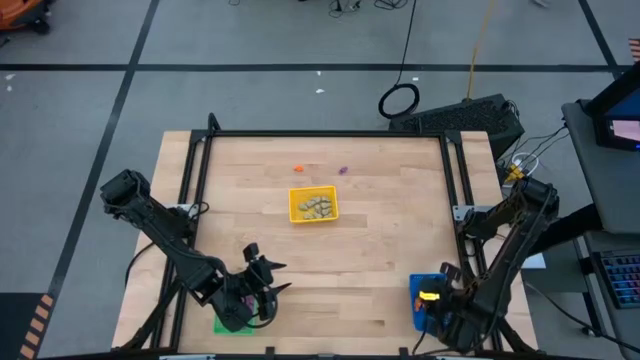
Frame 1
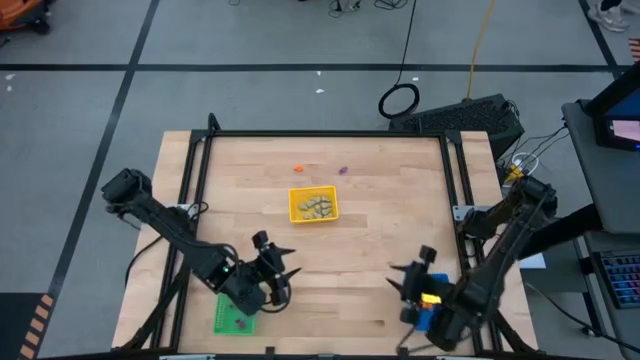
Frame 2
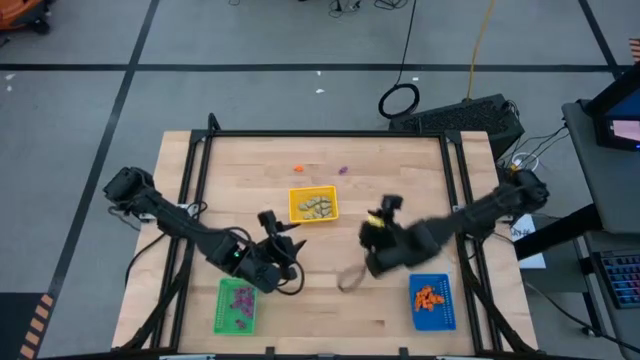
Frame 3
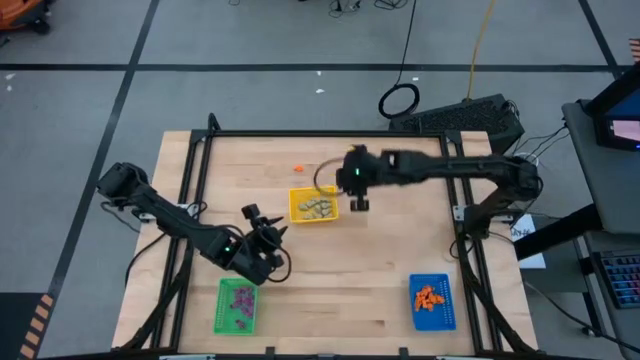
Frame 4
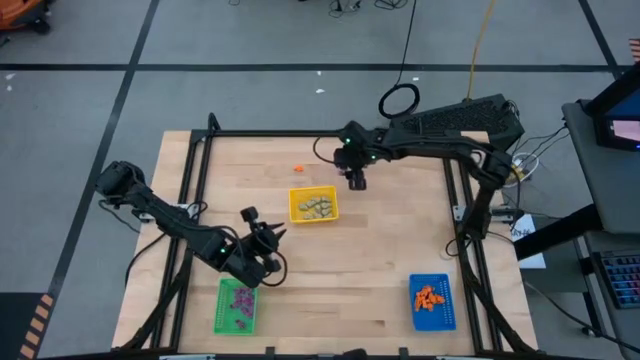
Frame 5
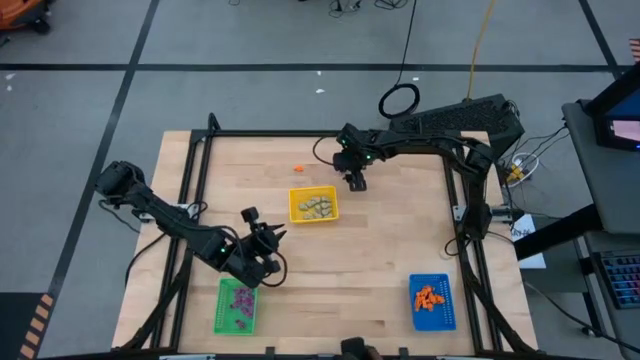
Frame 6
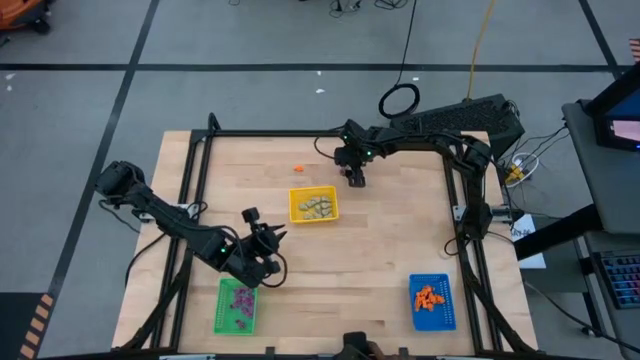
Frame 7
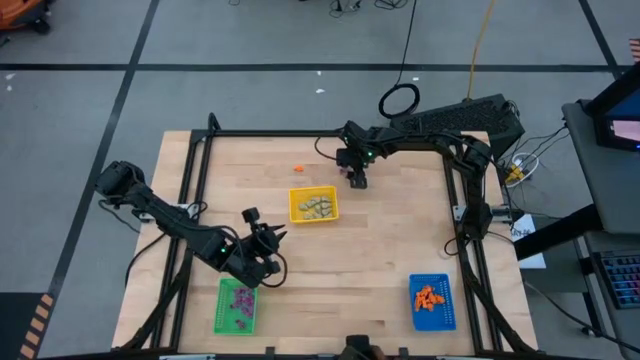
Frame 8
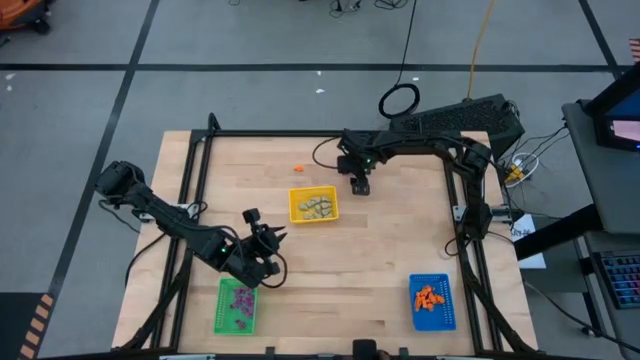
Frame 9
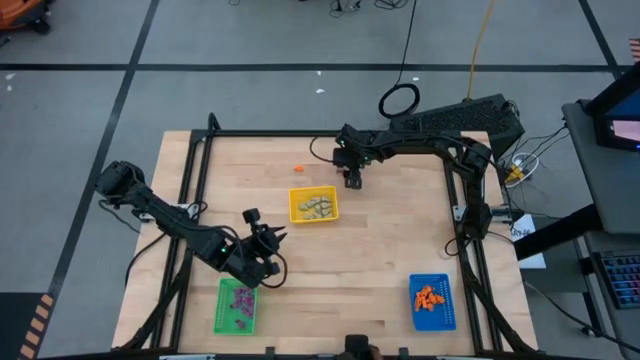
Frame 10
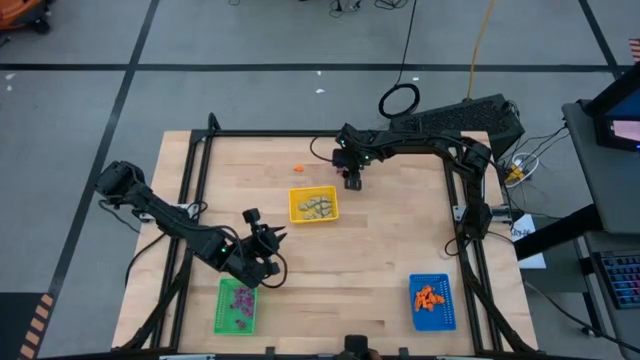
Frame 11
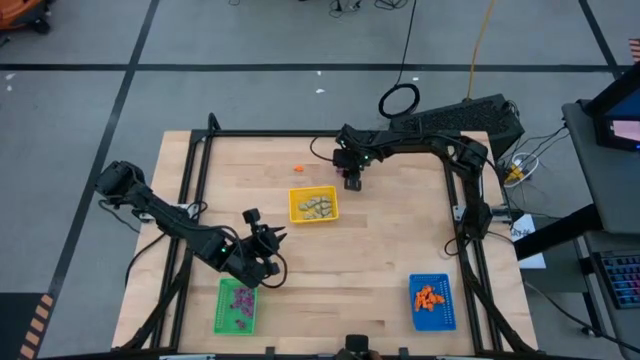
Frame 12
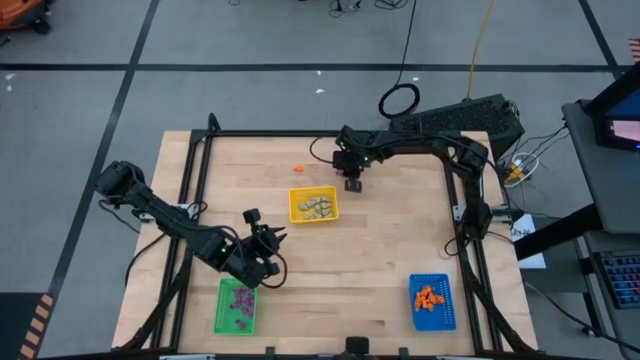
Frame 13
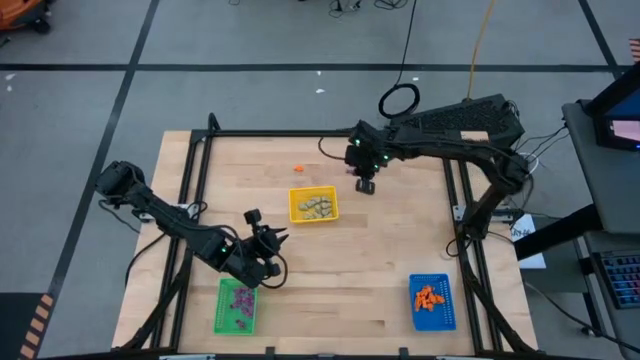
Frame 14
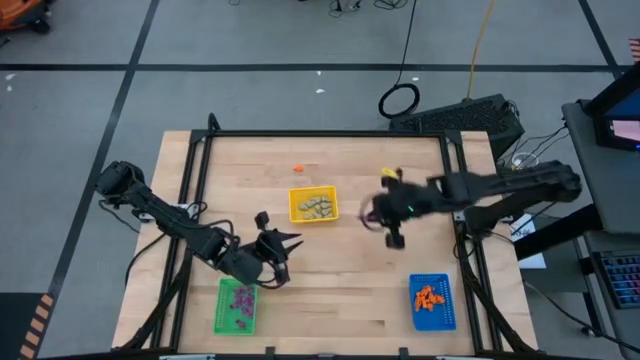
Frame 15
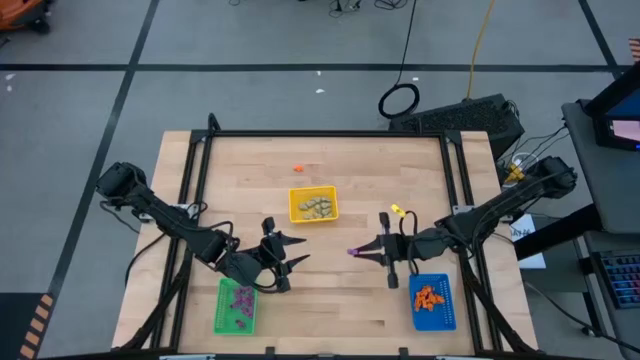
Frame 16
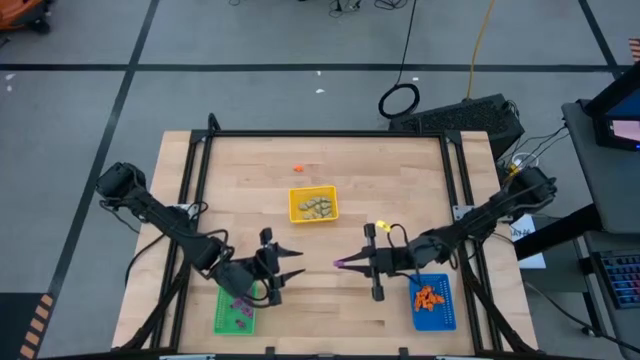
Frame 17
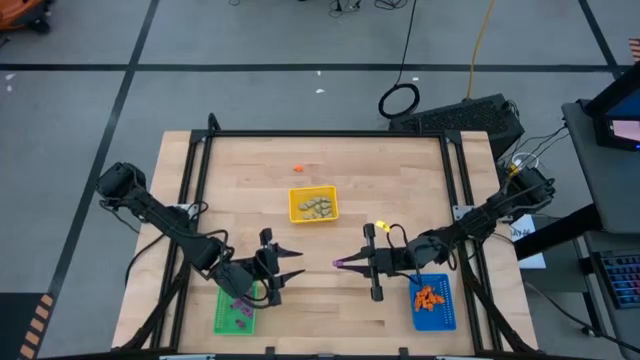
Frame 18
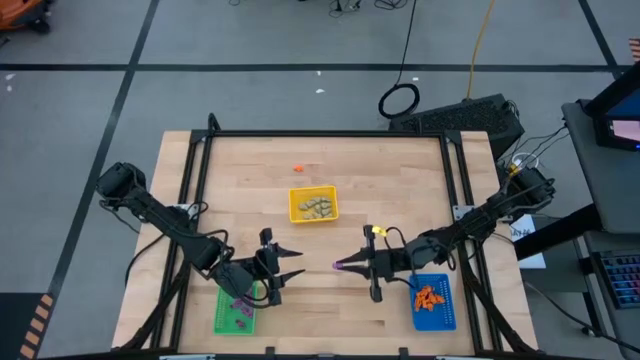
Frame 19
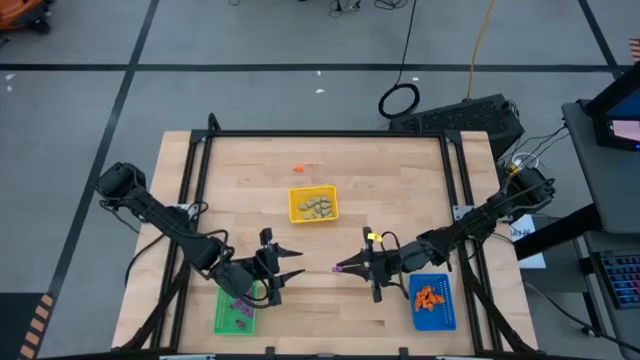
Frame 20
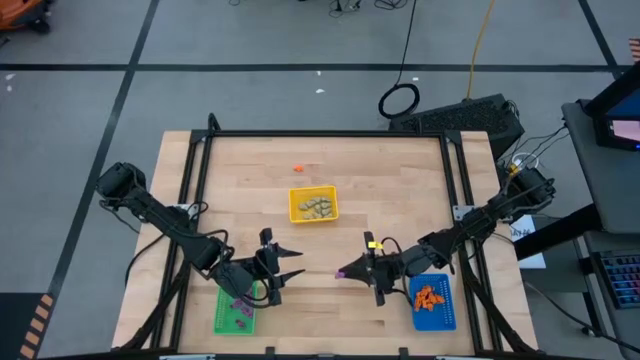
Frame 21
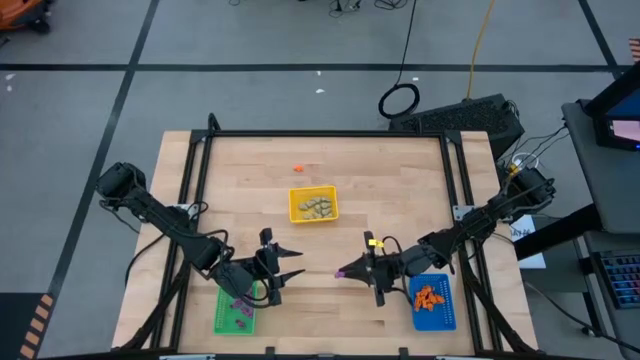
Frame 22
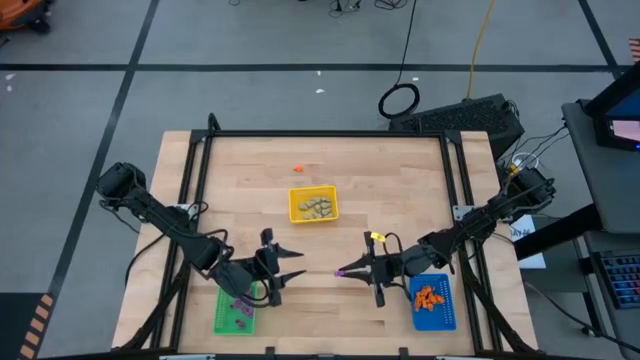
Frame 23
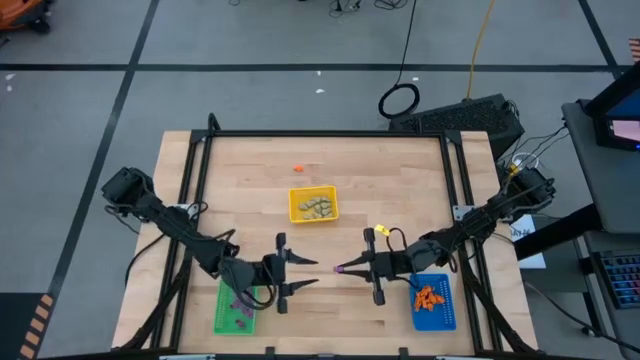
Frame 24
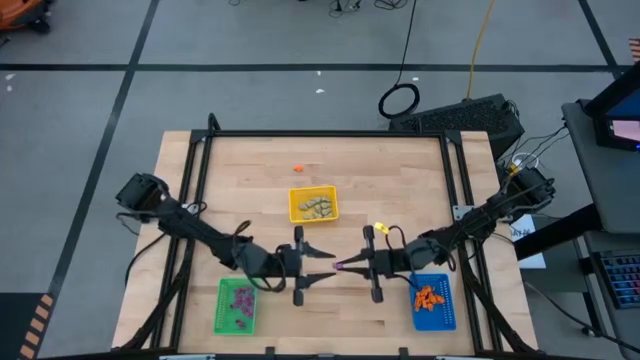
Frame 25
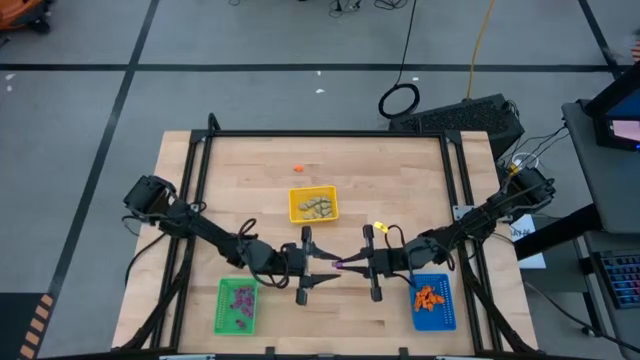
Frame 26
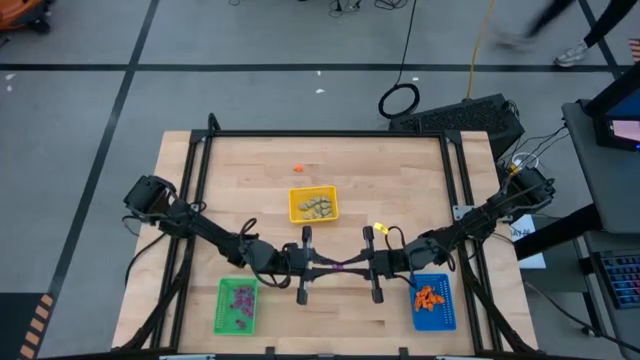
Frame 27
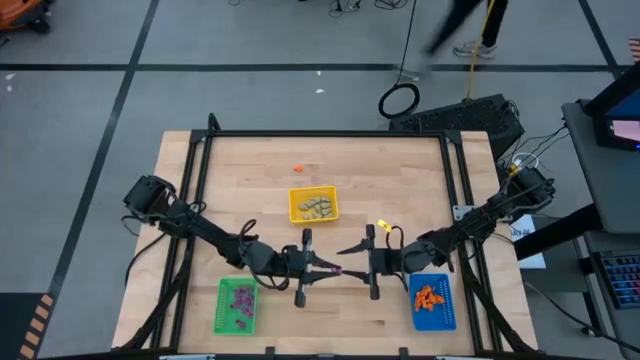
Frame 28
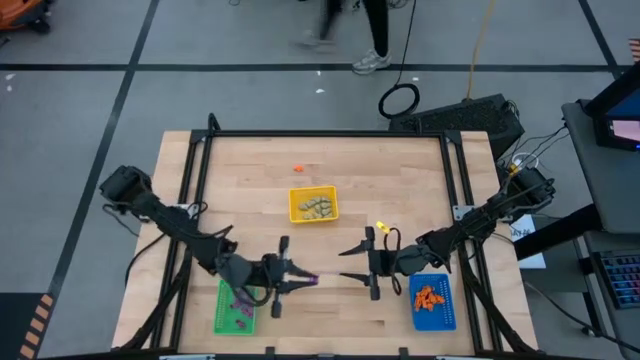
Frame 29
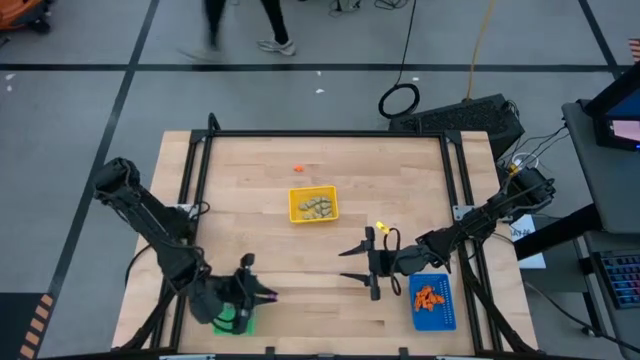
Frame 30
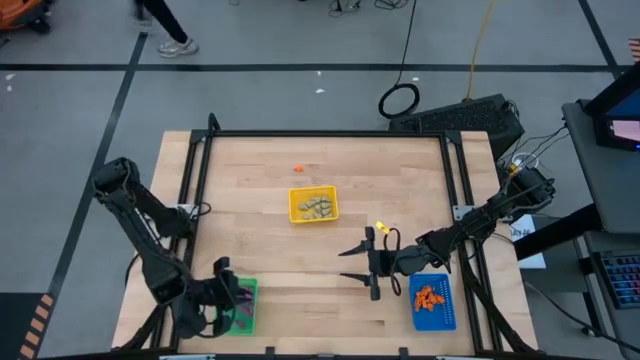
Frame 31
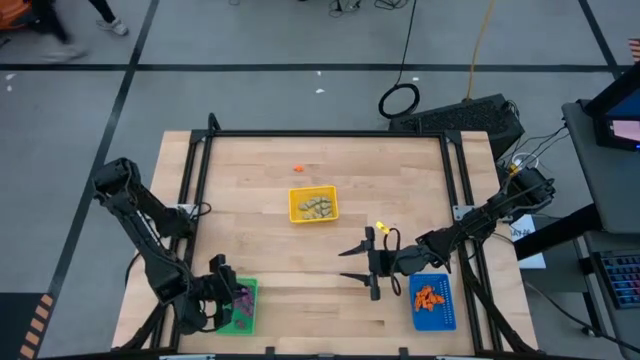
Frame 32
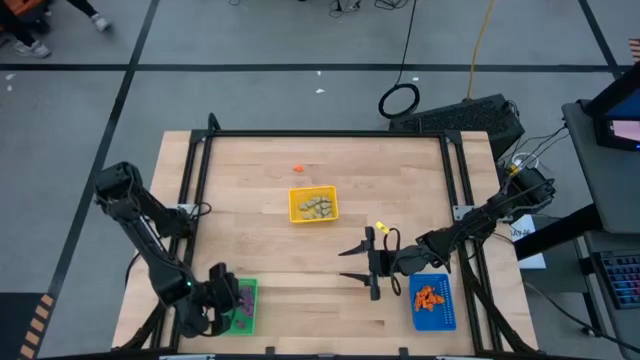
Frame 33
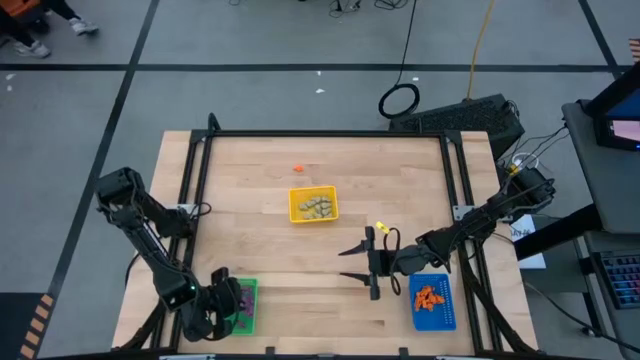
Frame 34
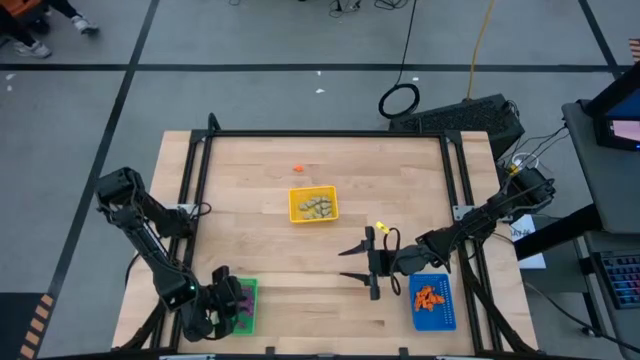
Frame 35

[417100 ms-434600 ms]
Task: Sort Halloween decoration
Put the purple skeleton toy in the green basket

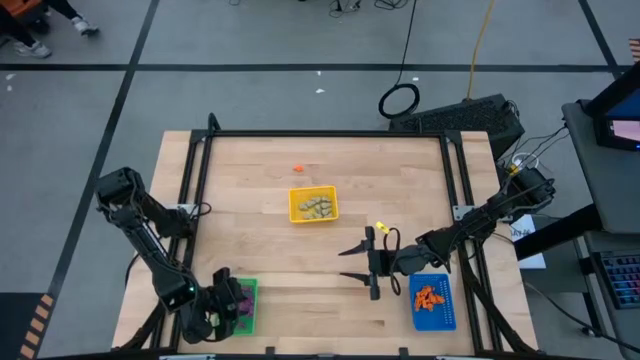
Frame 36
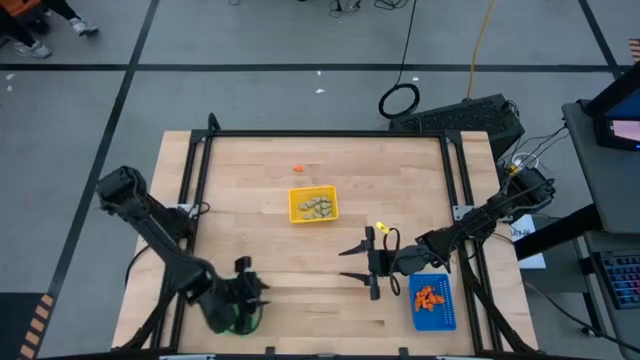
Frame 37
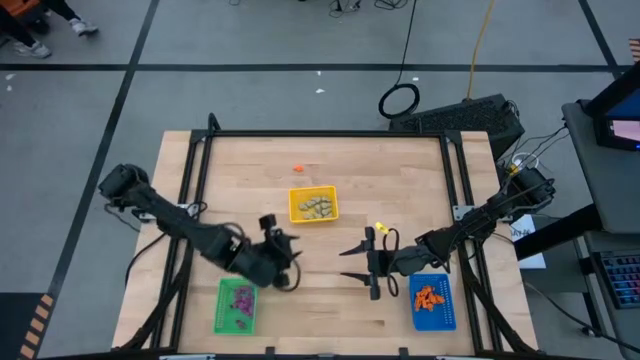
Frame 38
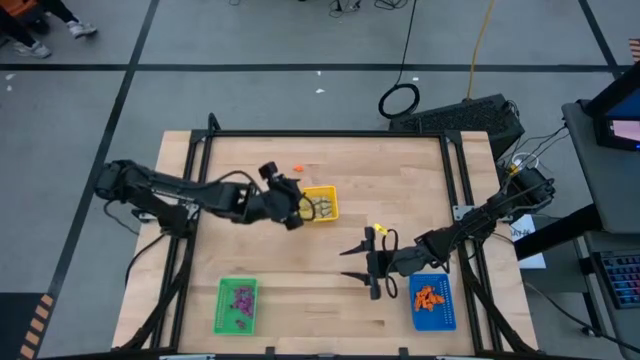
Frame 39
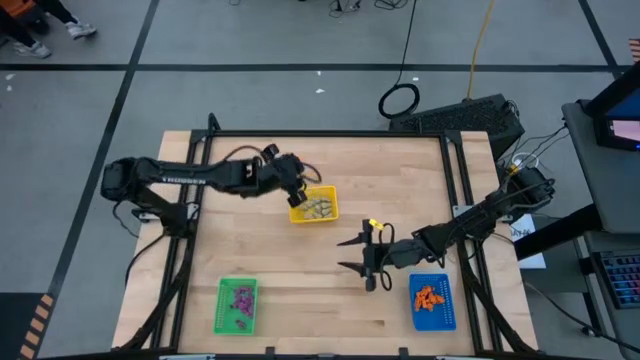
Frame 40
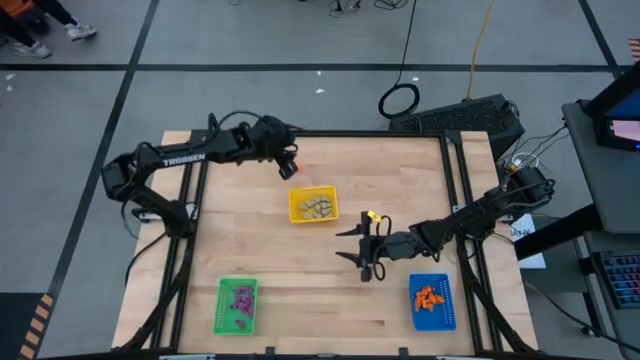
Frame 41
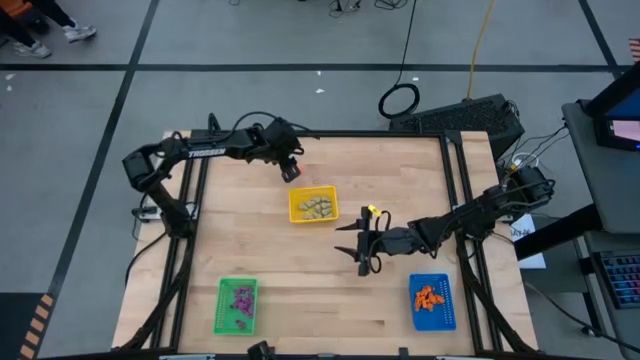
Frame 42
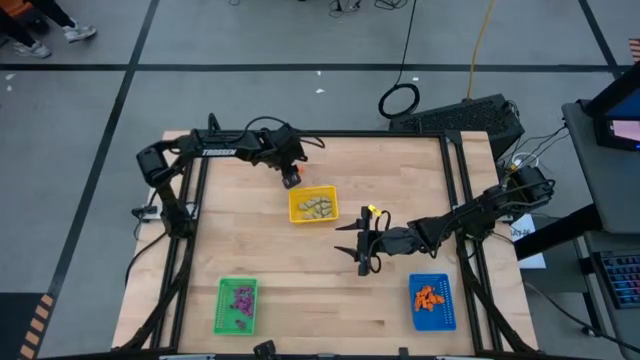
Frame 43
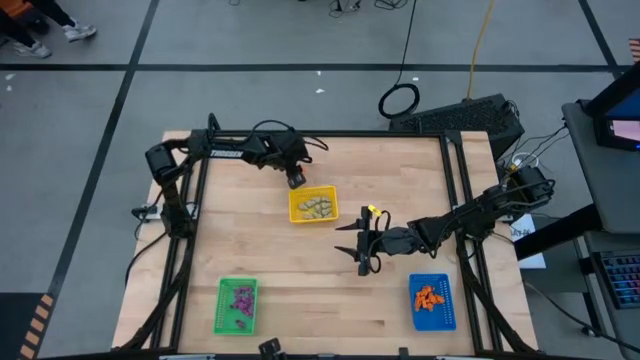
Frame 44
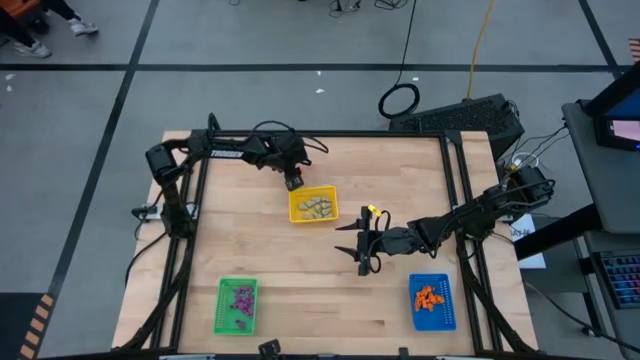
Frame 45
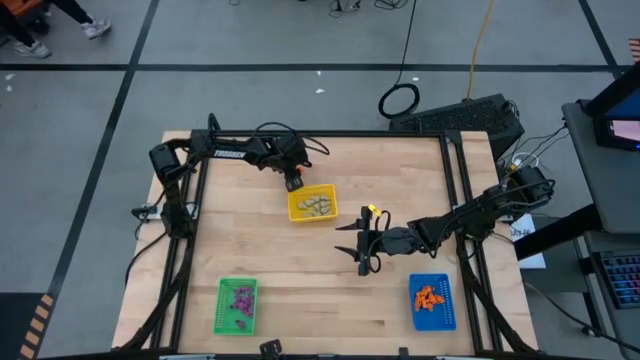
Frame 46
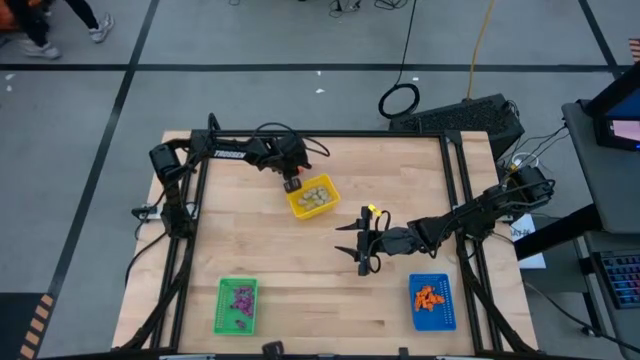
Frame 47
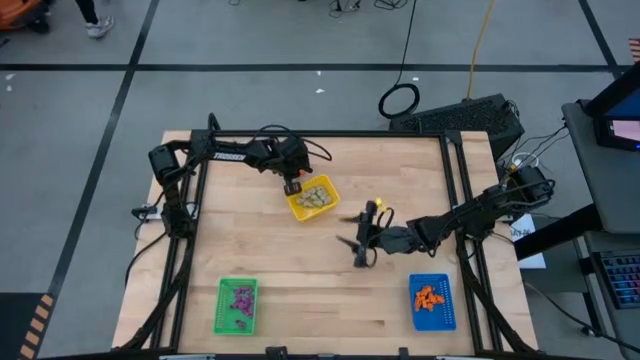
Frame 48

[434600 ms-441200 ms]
Put the orange skeleton toy in the blue basket
